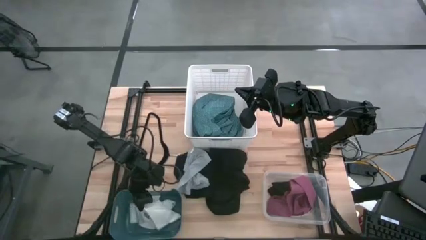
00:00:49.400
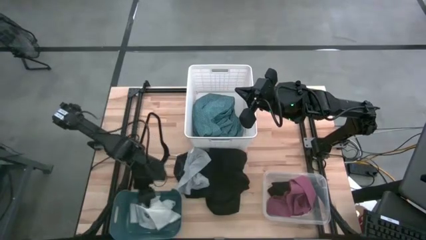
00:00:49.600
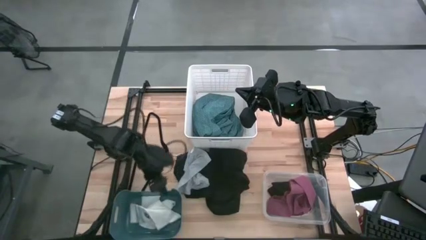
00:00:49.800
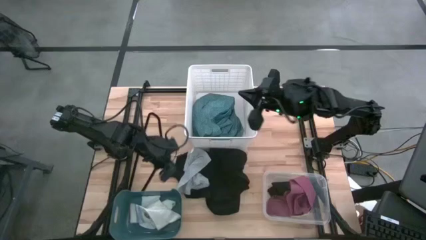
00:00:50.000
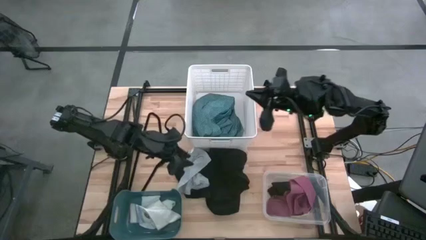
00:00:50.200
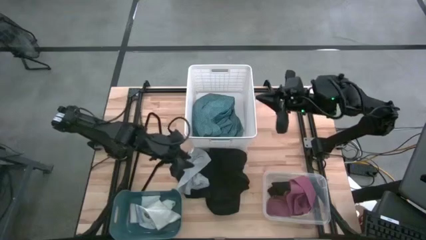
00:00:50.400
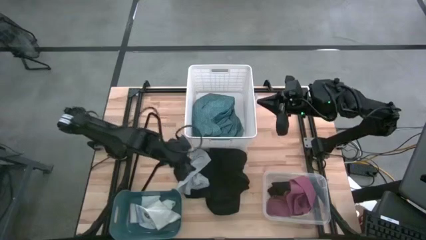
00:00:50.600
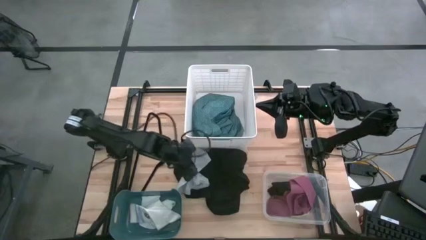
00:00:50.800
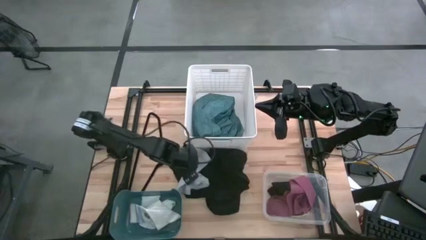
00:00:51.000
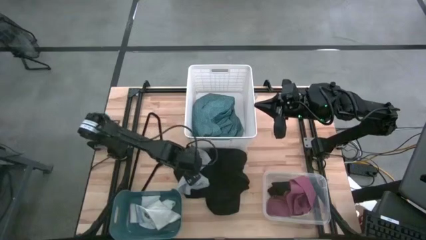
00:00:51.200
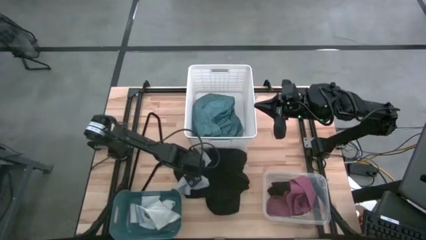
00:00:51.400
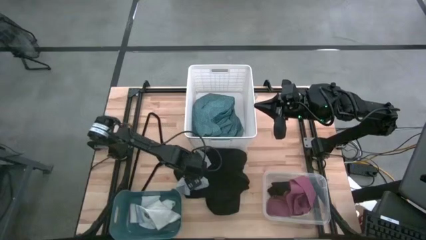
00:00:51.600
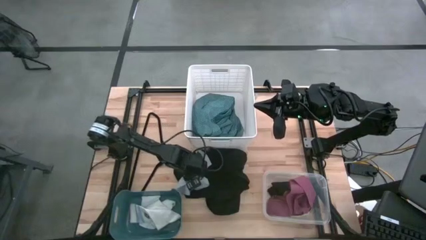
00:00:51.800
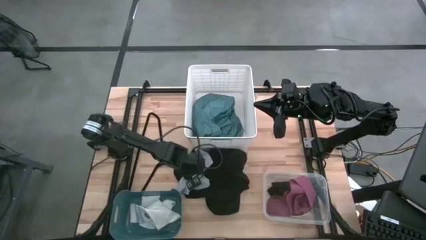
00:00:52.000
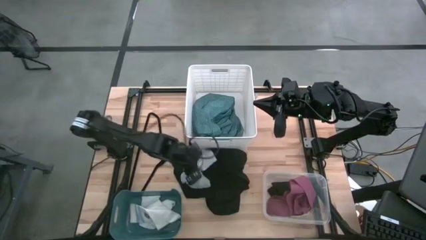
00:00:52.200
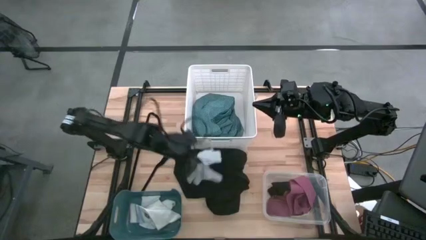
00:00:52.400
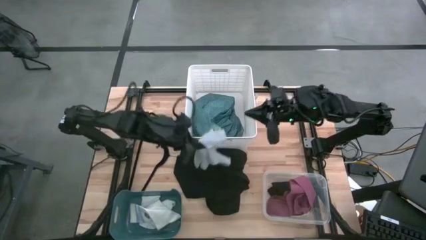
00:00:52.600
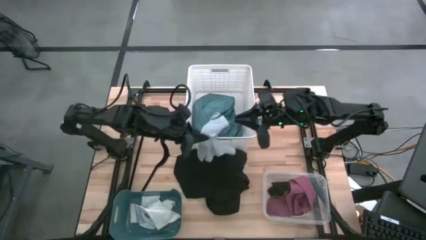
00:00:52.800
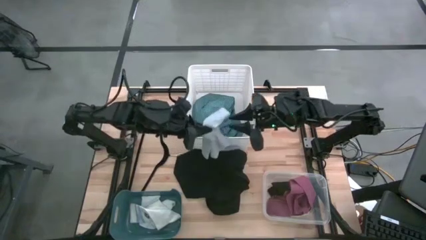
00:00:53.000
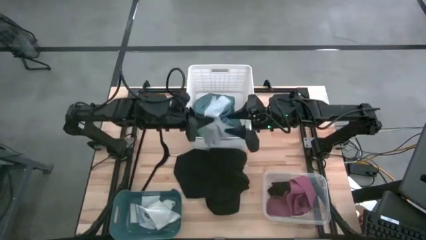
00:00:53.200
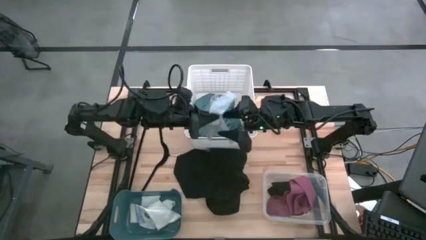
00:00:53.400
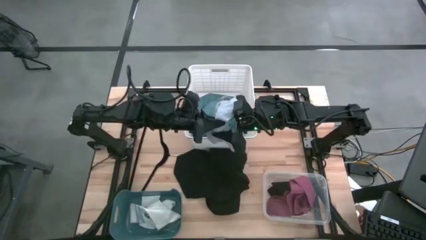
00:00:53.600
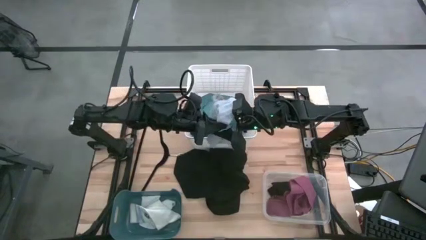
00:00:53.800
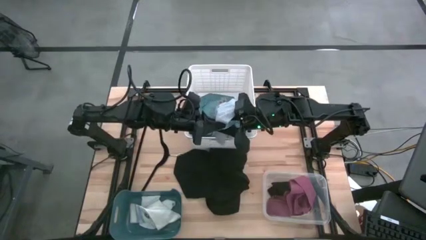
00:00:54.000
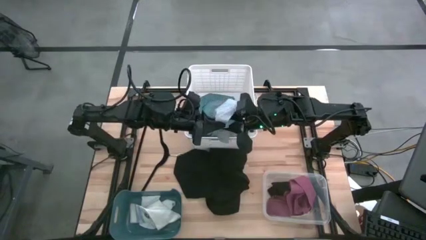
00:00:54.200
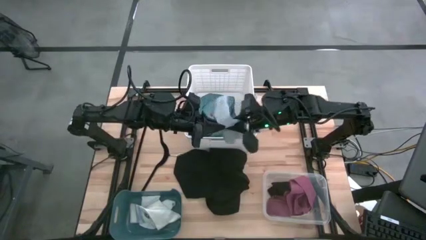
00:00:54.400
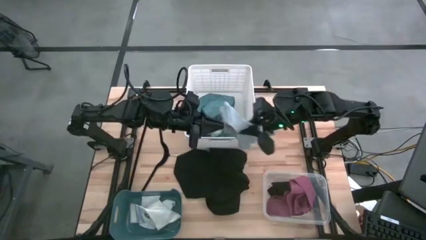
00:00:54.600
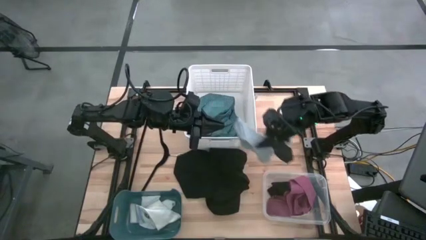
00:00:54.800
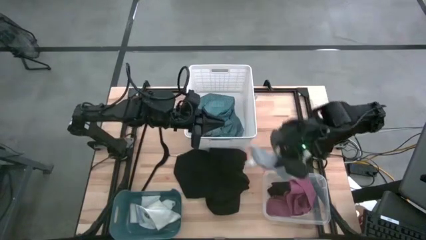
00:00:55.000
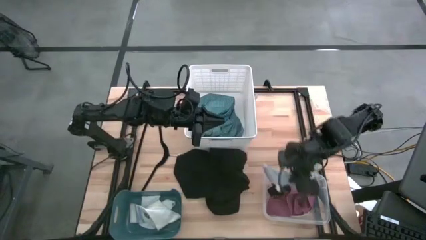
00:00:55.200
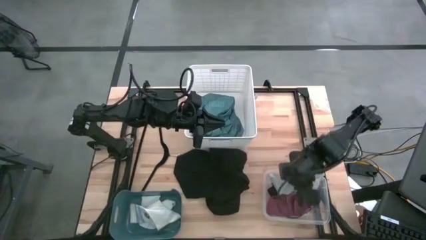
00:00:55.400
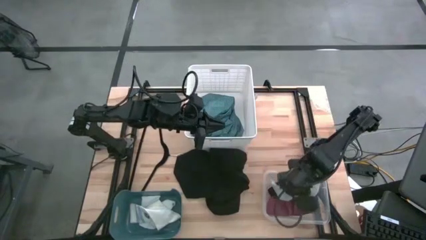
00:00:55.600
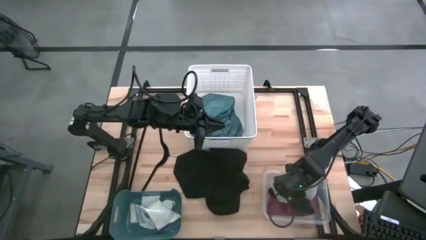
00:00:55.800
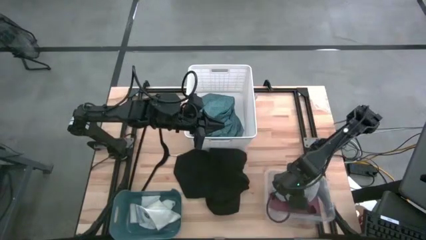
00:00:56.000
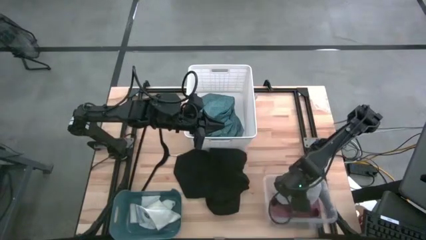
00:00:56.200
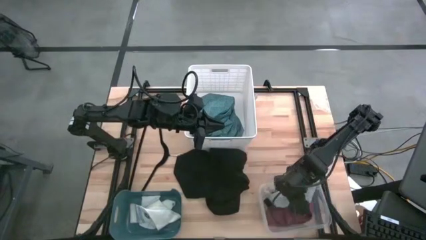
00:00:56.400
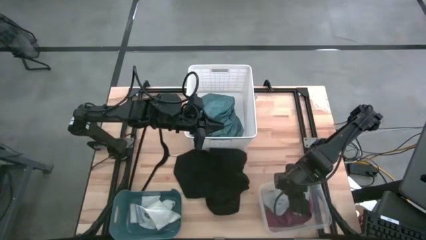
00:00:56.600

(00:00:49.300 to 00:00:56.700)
Task: Pick & Place Cloths
Put the gray underwear into the transparent bin

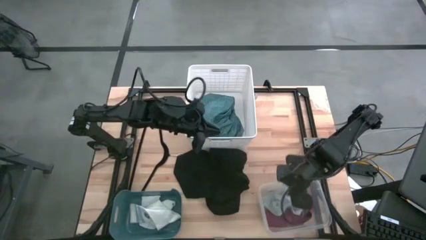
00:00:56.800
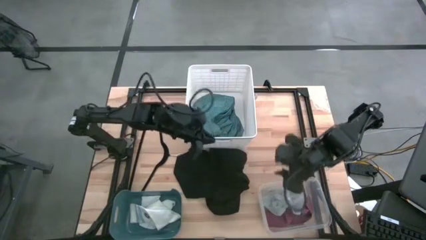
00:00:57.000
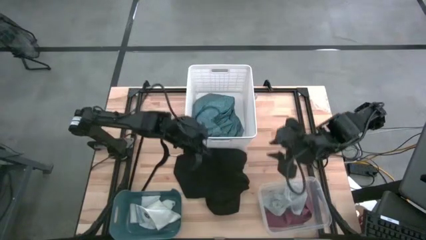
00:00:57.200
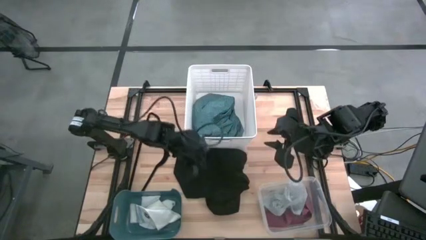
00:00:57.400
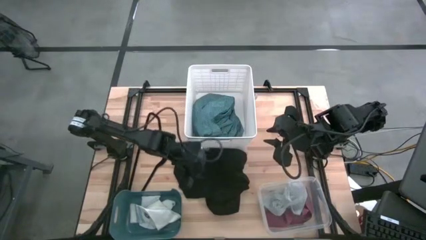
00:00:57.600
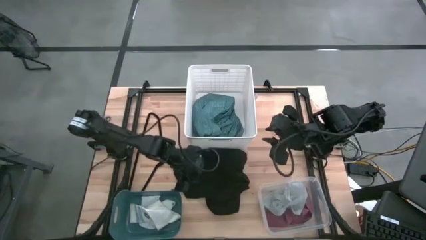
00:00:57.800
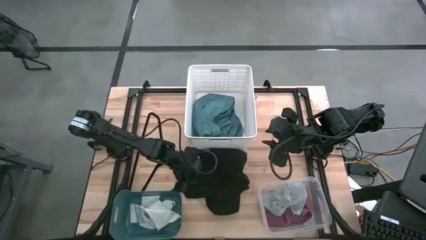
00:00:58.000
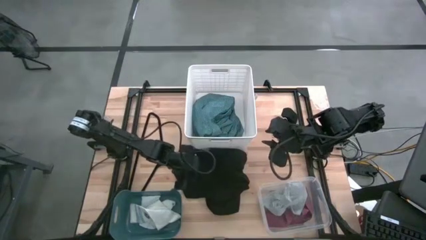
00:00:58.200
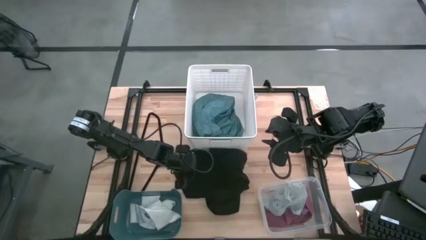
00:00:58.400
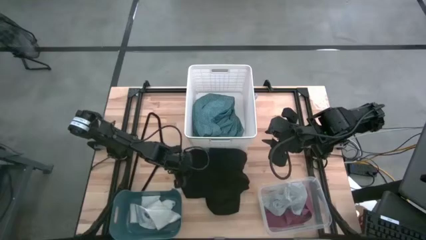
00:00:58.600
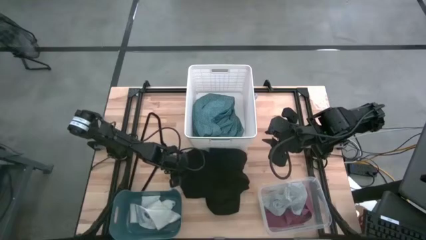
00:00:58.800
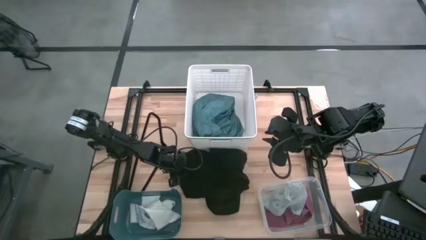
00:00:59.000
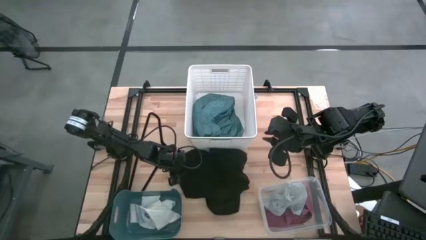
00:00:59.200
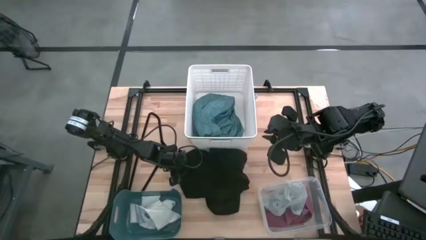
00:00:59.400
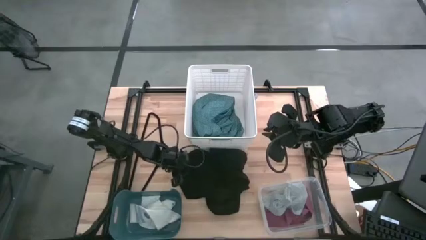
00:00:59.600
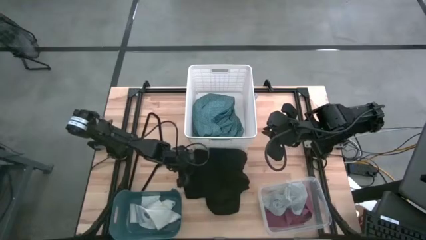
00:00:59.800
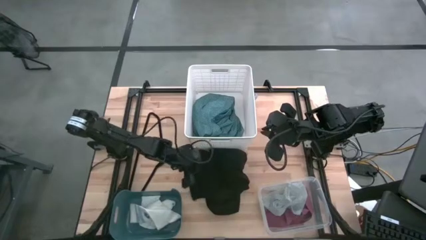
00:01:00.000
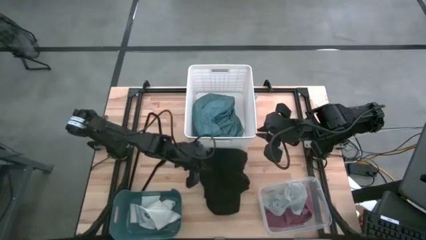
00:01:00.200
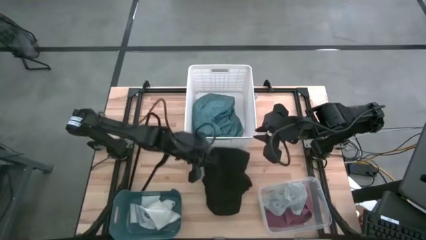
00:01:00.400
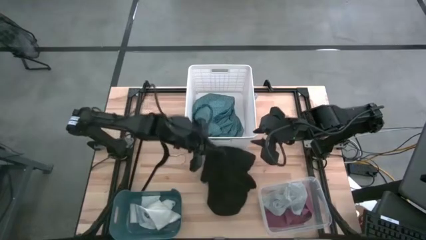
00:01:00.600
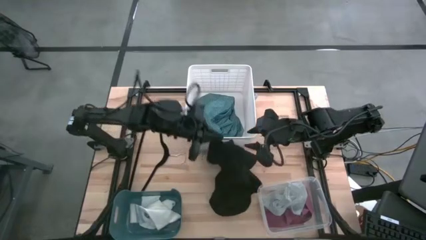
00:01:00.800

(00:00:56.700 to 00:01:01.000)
Put the black shirt into the white bin

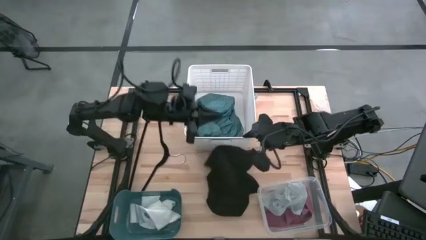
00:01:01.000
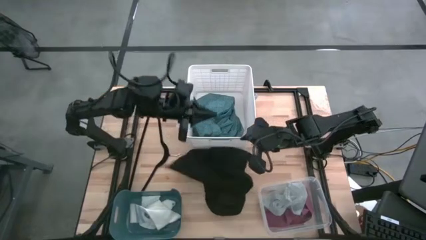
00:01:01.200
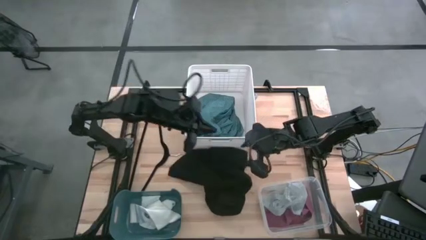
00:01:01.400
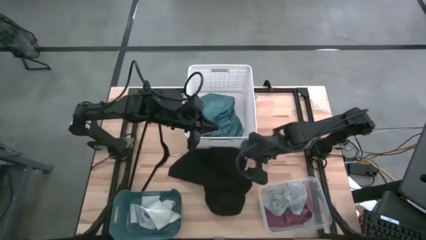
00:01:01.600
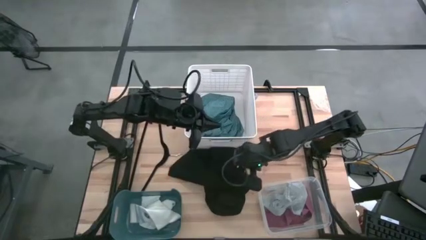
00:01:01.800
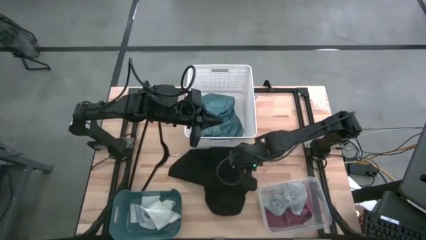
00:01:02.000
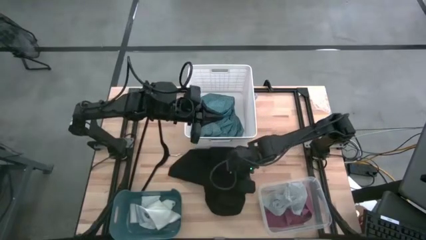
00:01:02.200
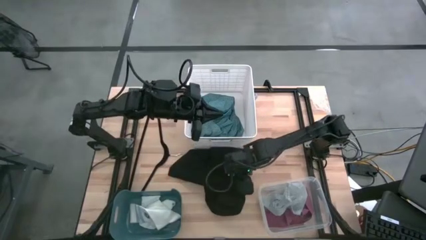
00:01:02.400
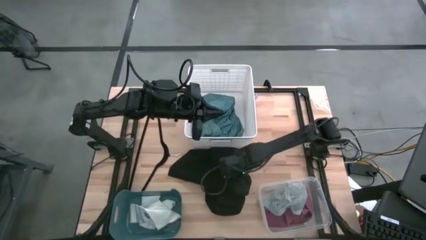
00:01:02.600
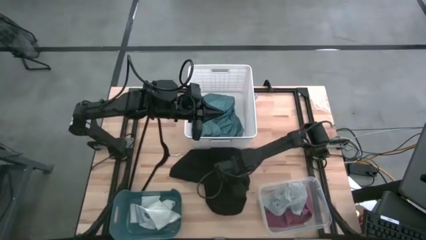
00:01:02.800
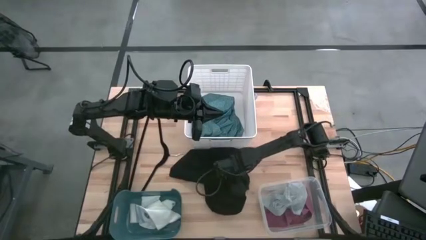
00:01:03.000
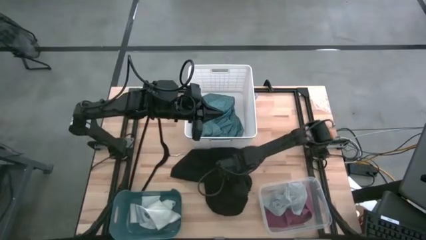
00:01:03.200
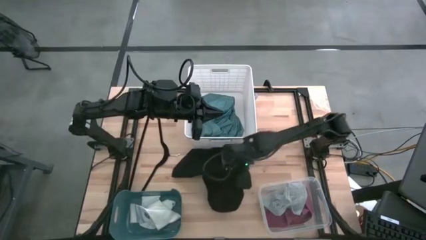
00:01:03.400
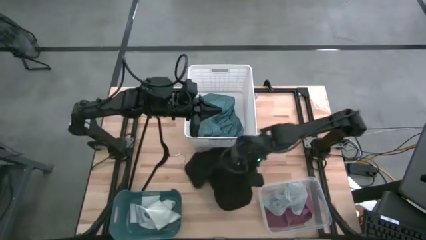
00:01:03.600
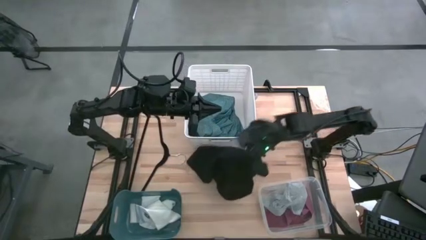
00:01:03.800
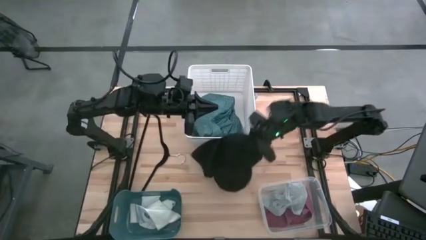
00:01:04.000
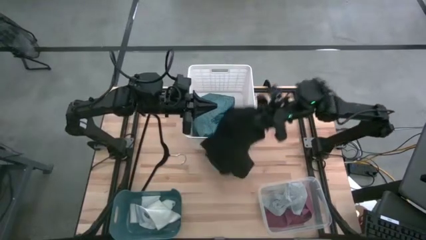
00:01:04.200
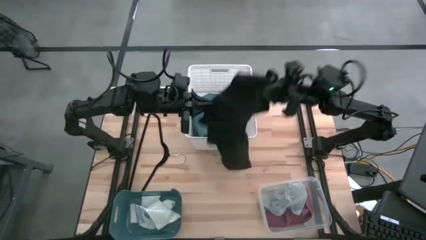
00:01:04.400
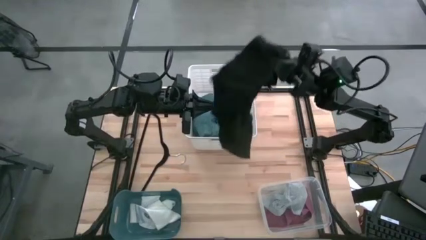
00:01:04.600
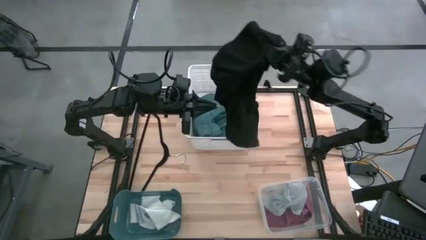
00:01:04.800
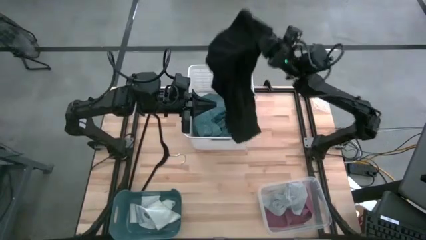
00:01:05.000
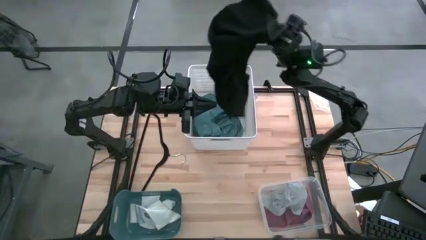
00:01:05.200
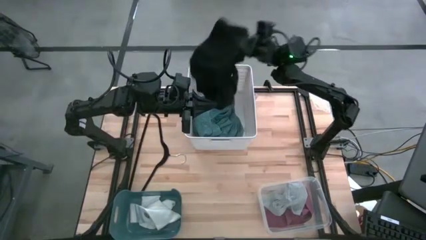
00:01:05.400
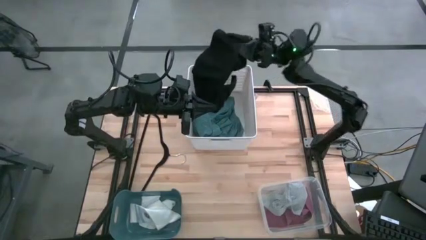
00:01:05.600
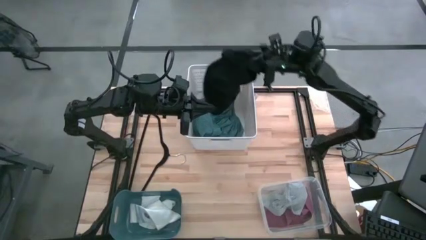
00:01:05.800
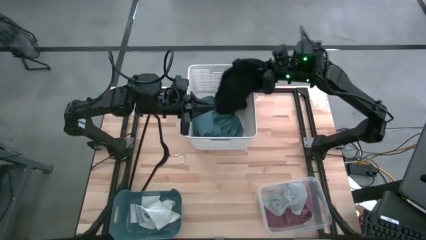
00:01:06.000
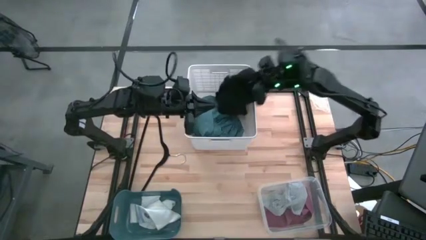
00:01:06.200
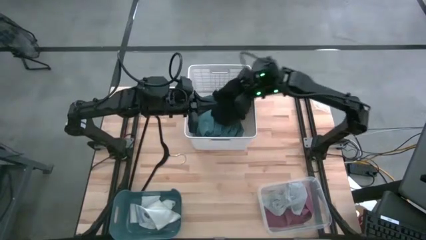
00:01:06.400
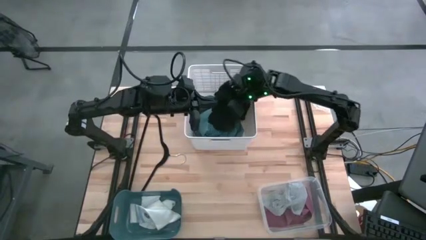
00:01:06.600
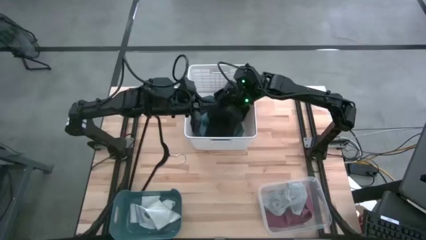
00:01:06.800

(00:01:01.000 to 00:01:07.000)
Put the black shirt into the white bin
